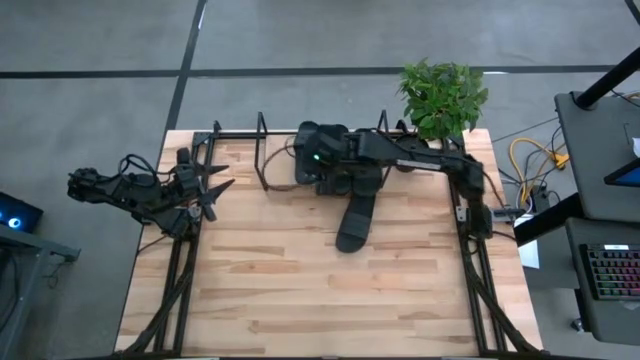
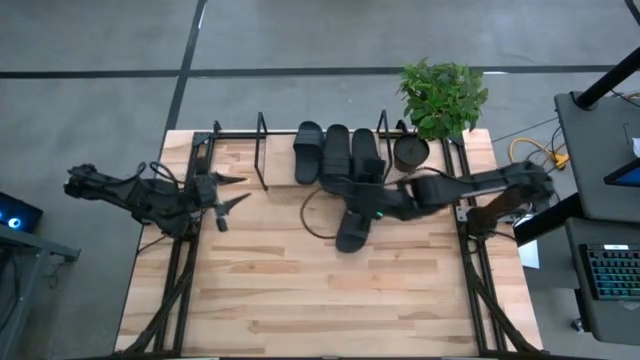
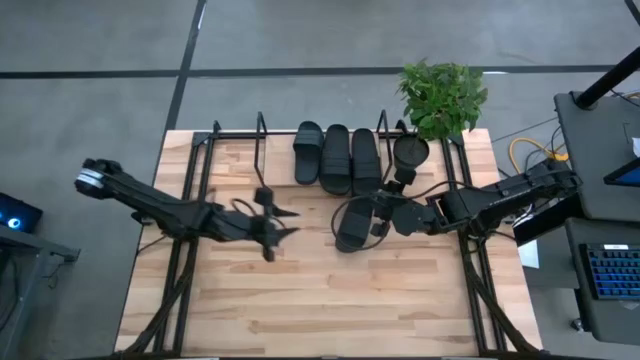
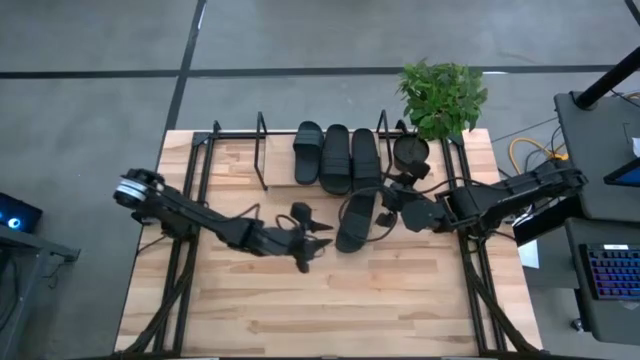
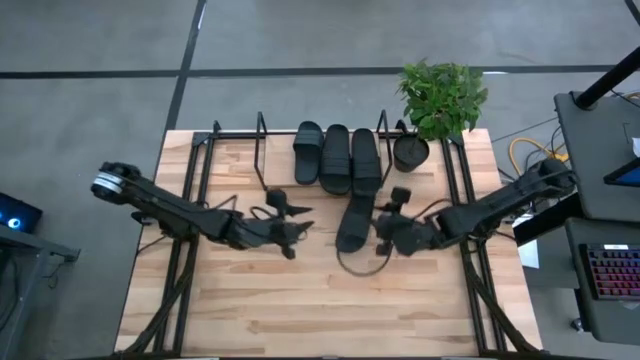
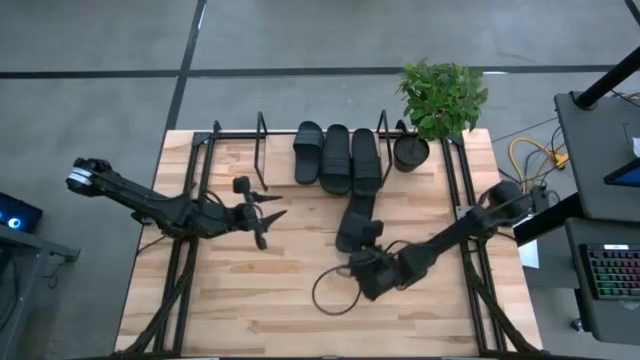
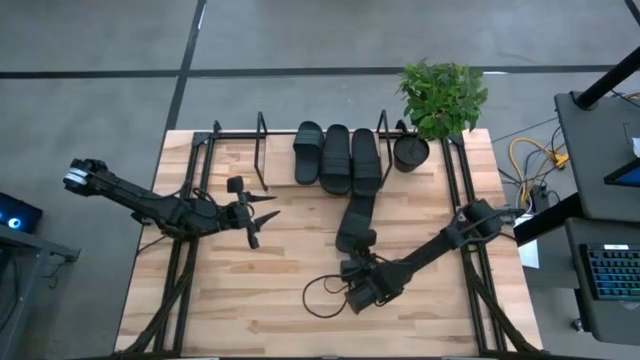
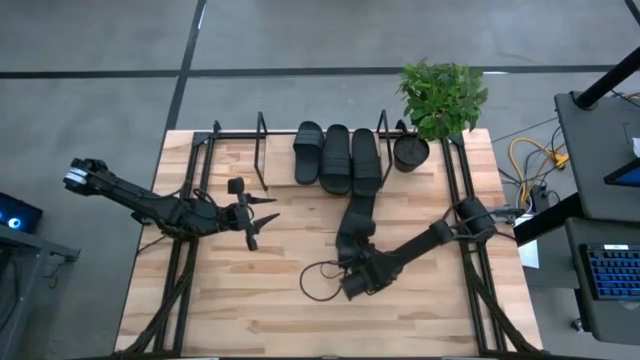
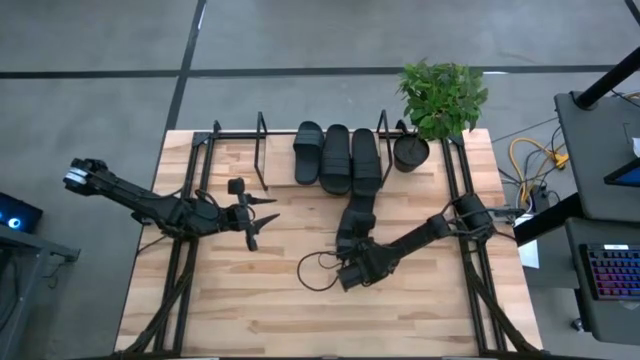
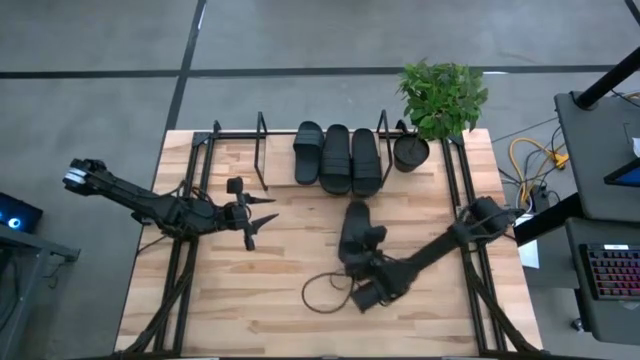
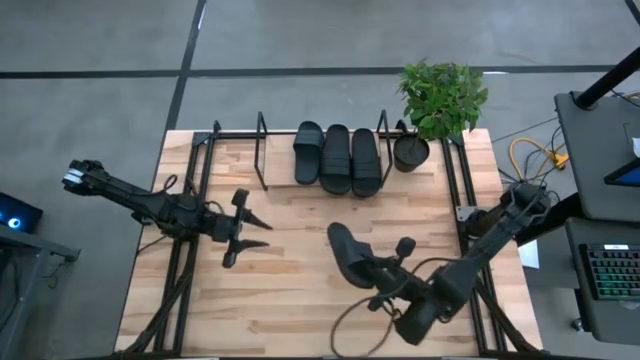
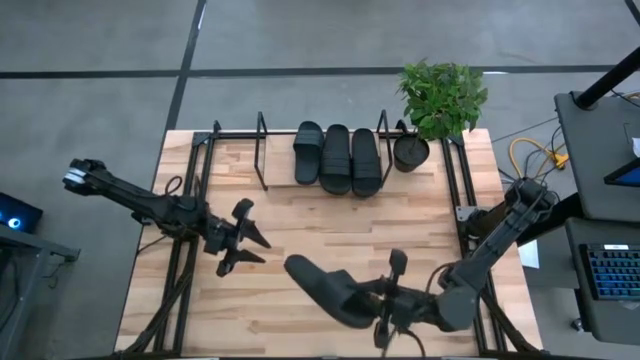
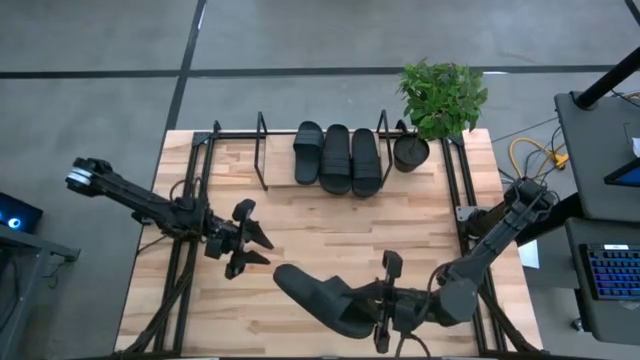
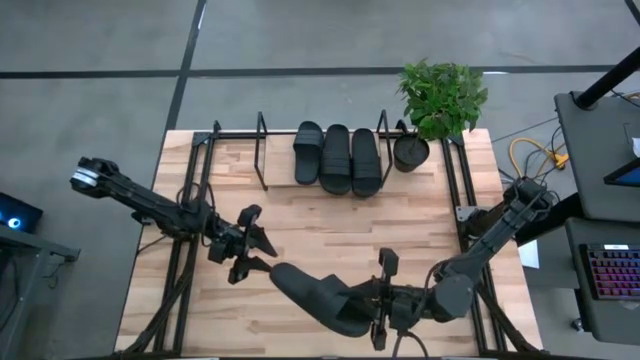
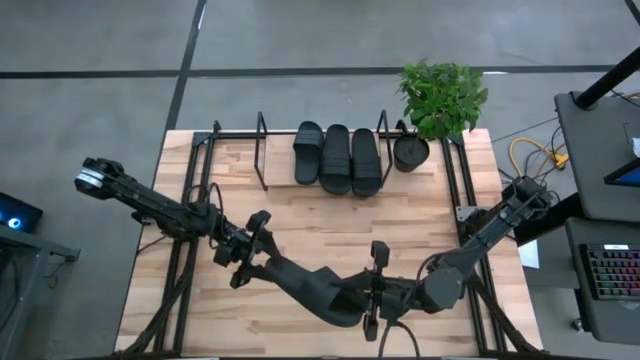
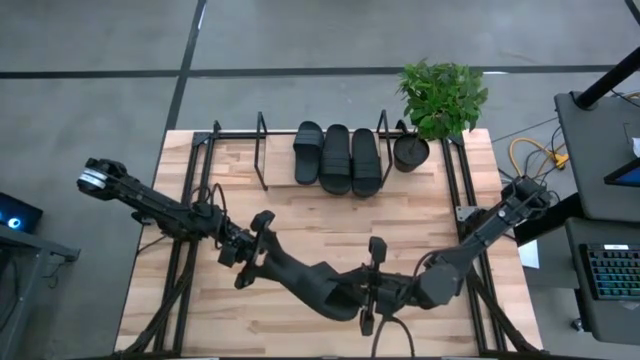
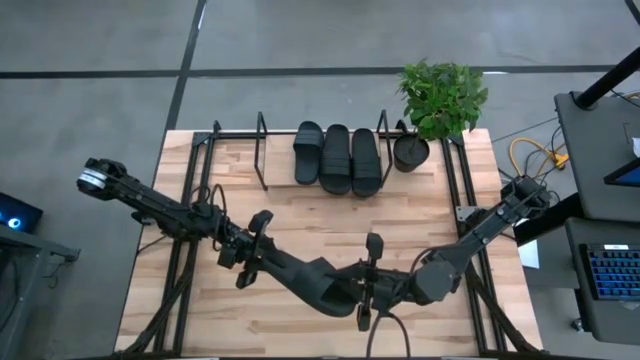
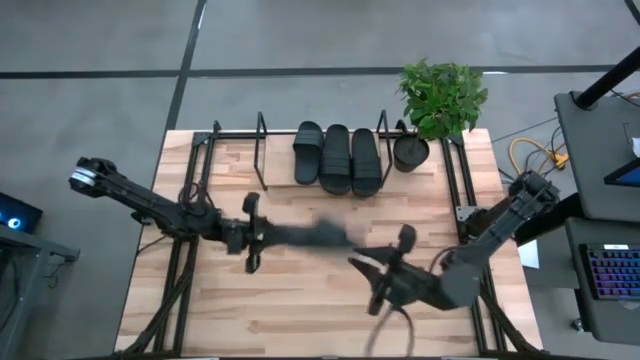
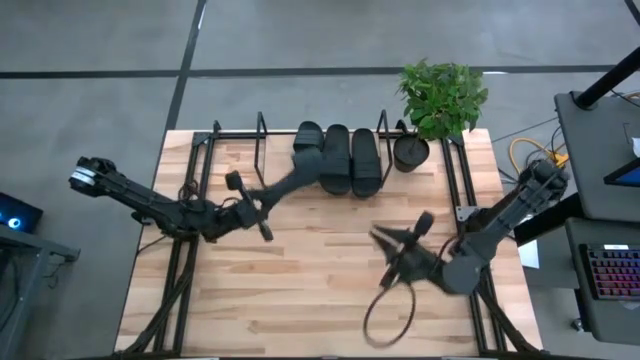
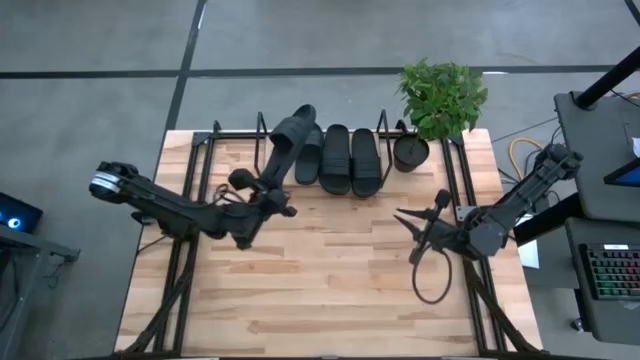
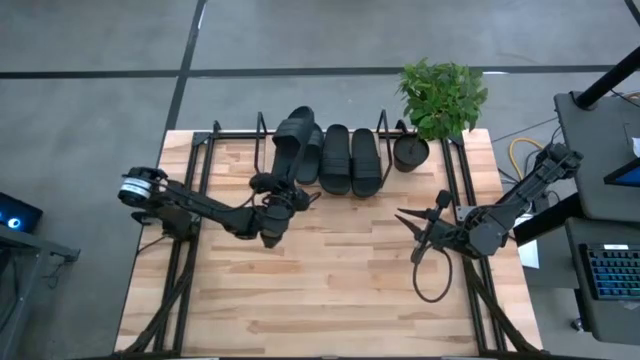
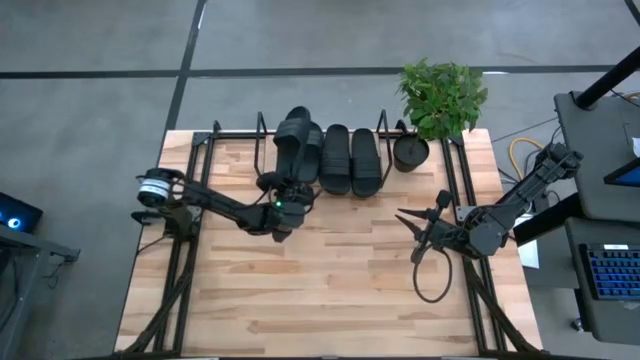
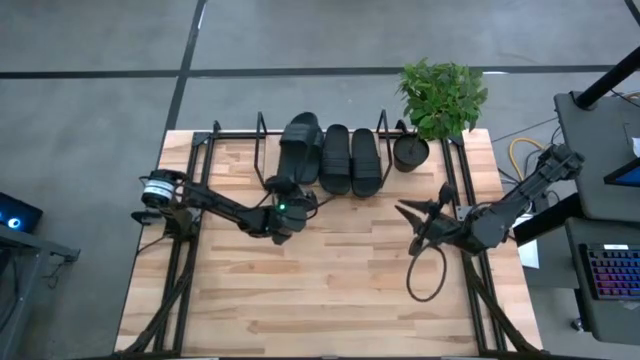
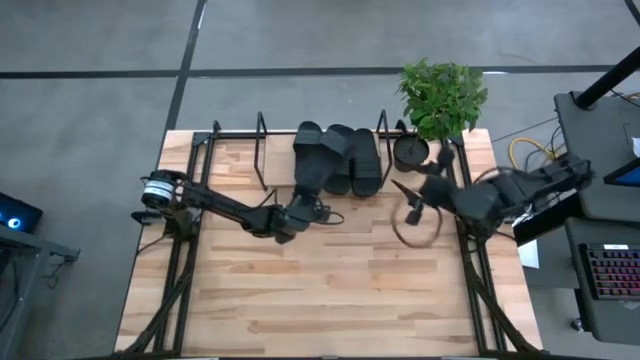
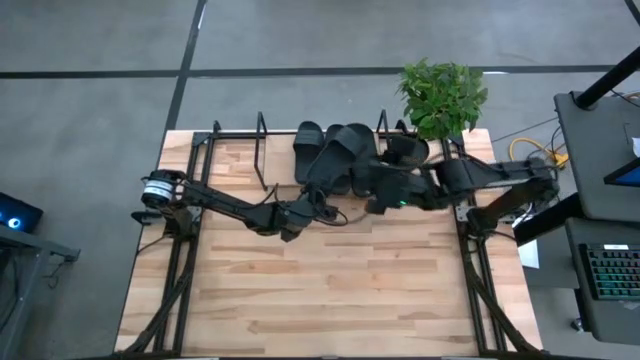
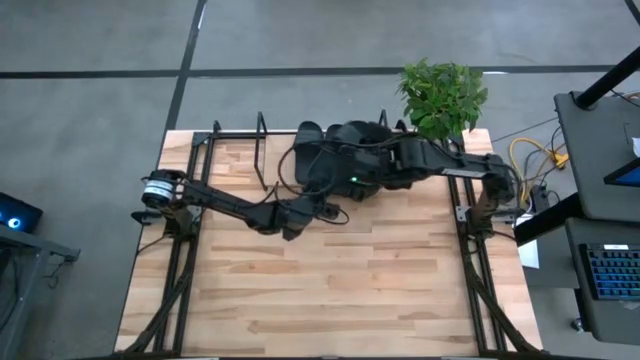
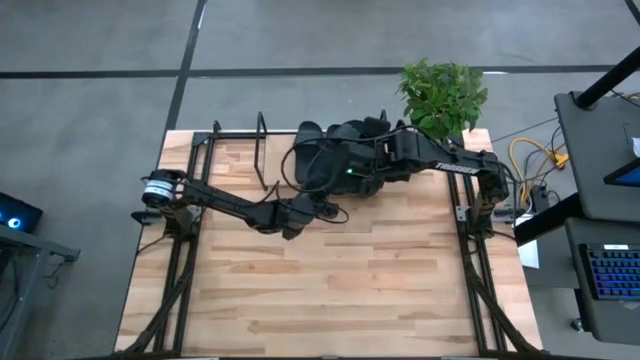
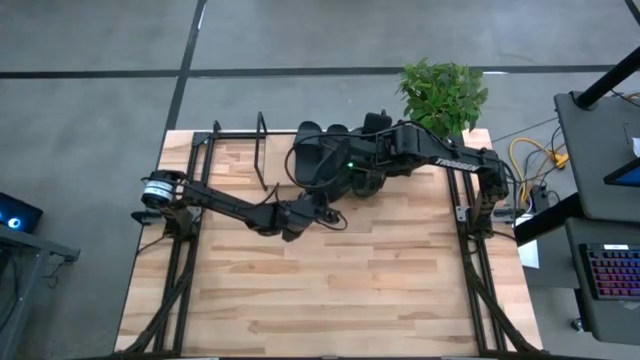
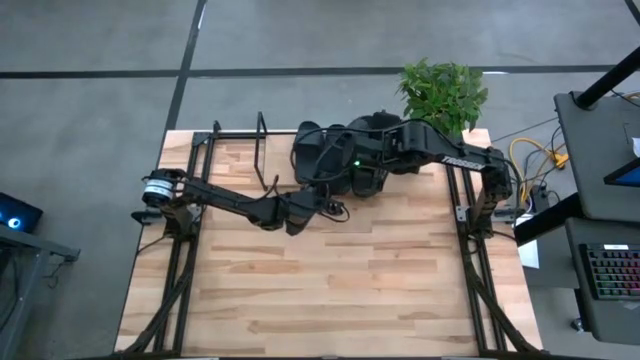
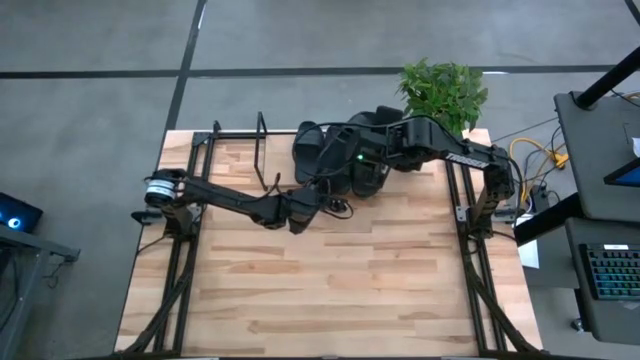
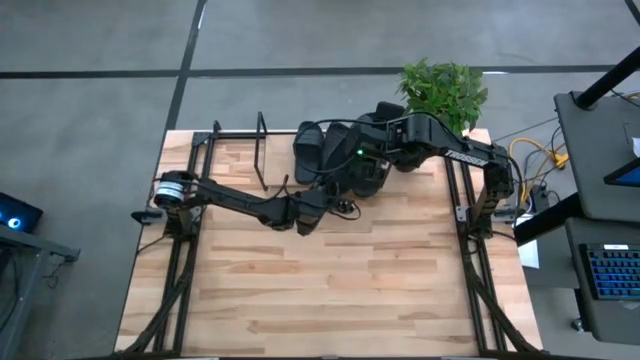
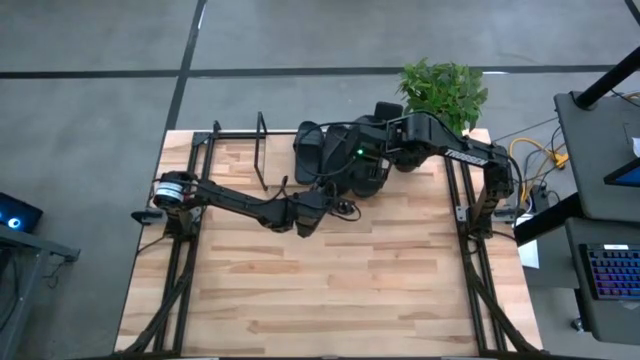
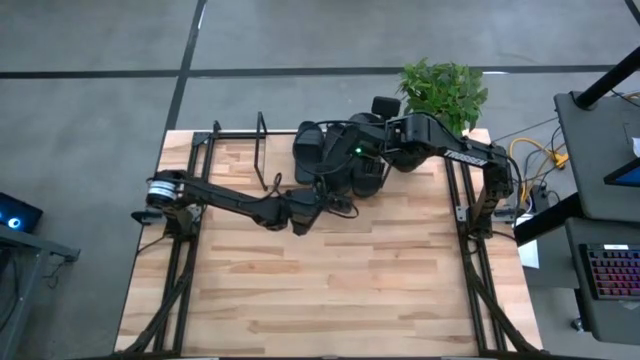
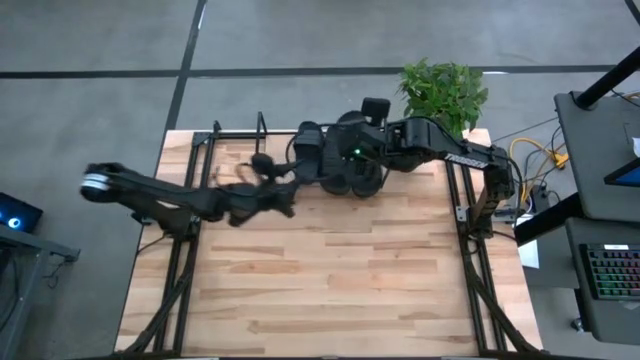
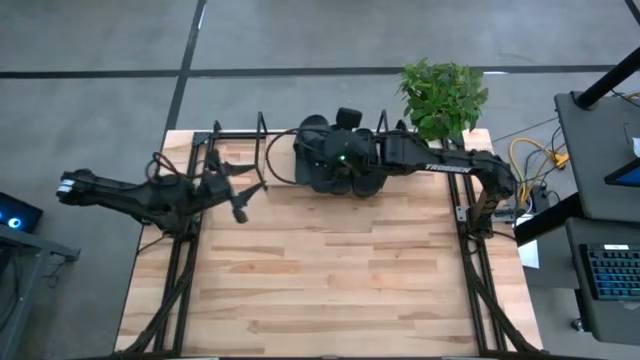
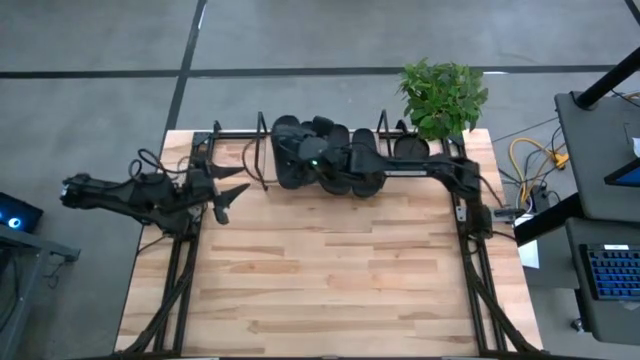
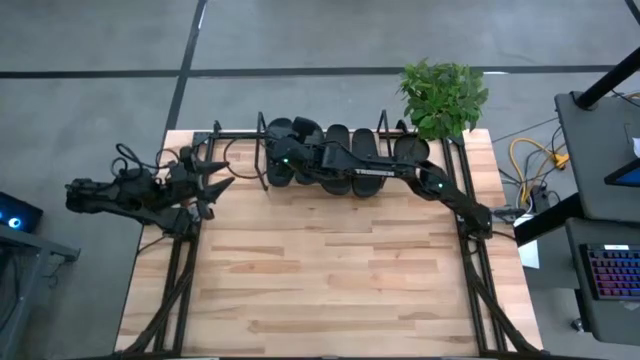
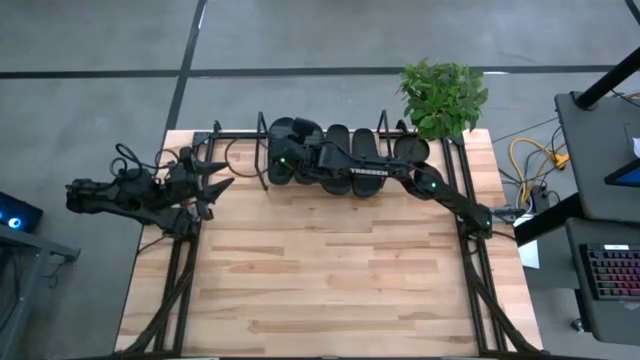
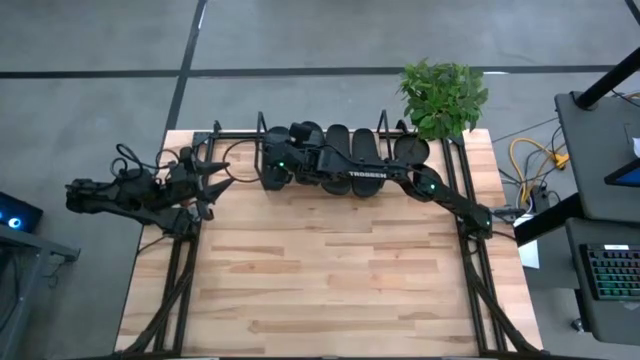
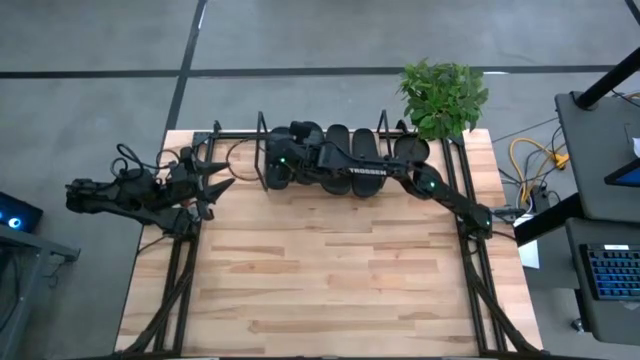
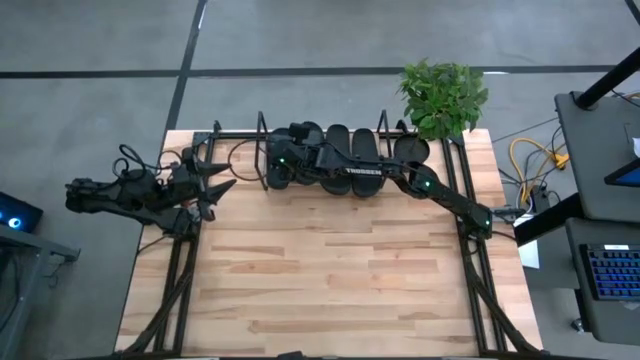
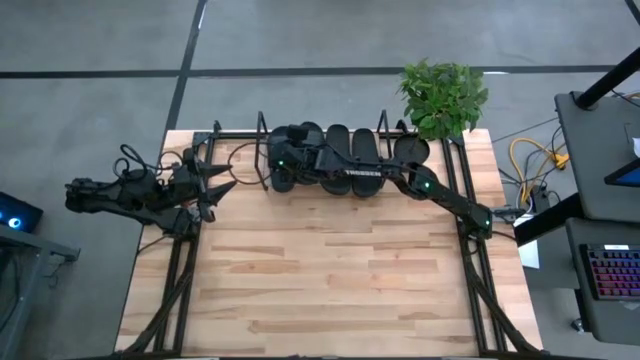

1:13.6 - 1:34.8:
Task: Pick and place slides into the shelf
Put the black slides on the shelf
